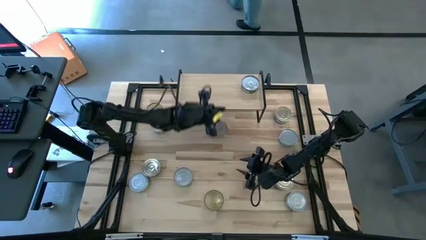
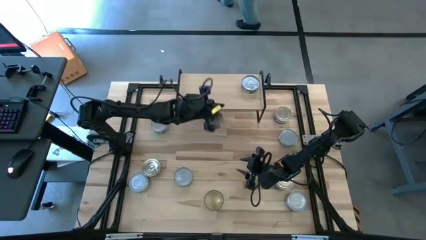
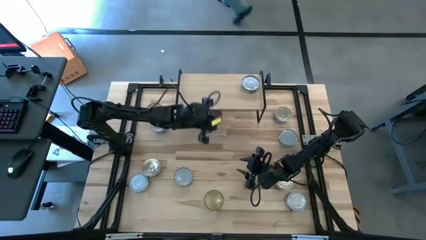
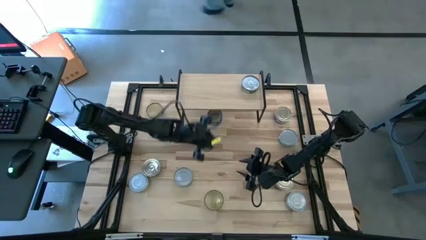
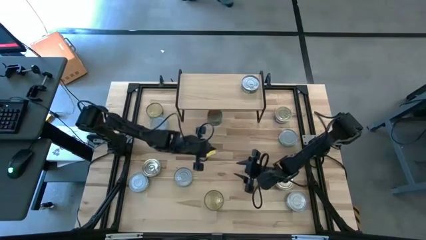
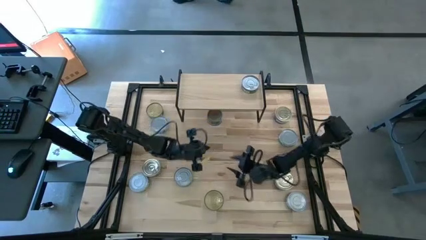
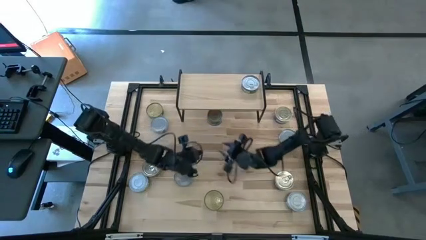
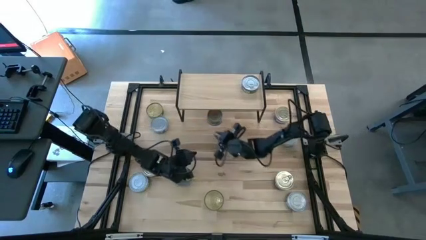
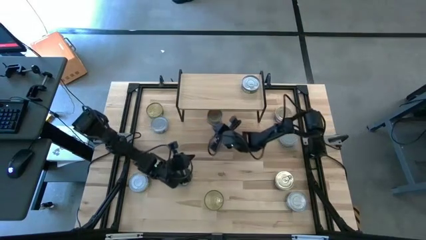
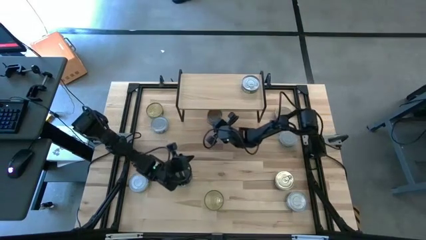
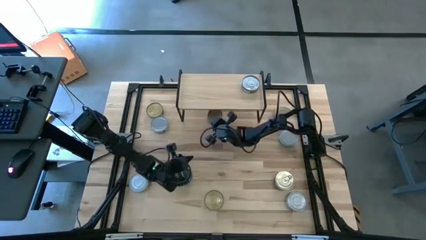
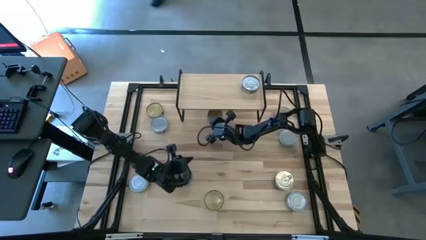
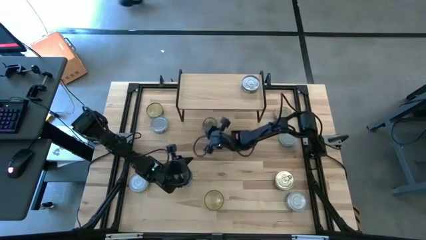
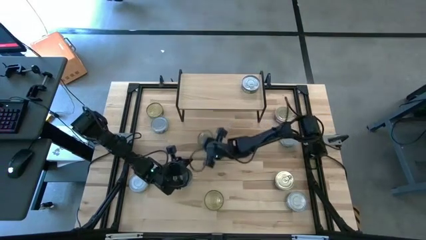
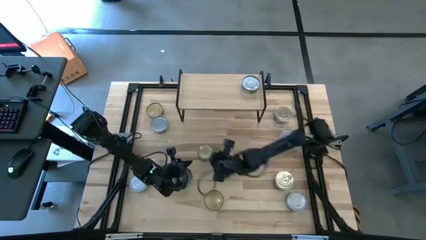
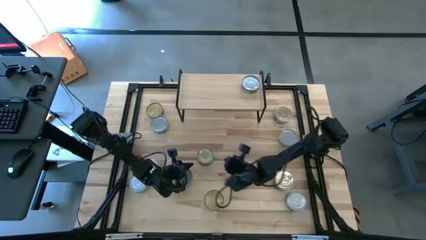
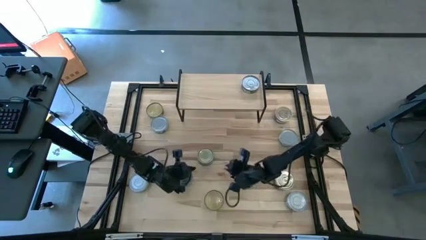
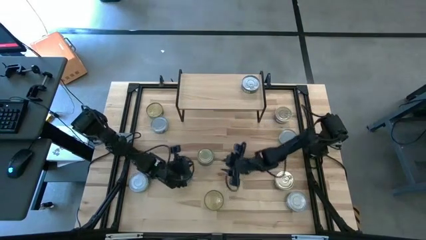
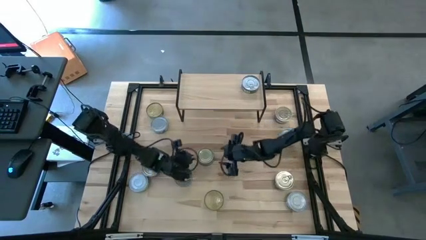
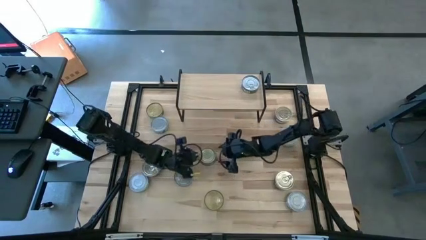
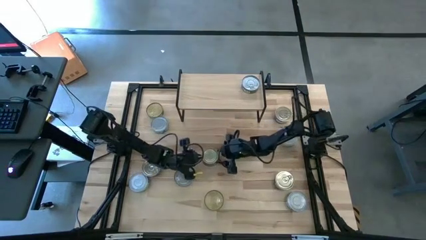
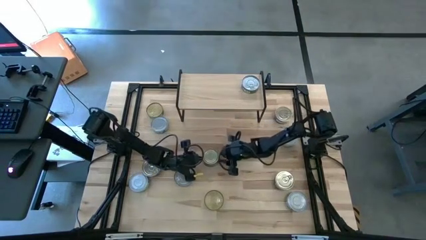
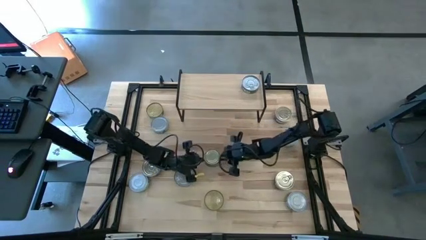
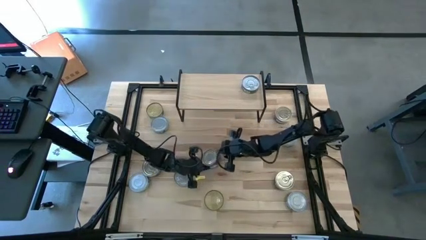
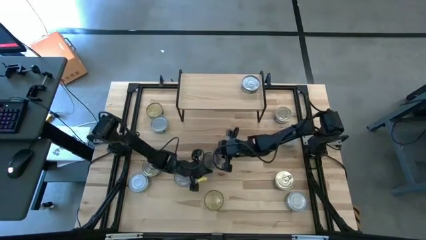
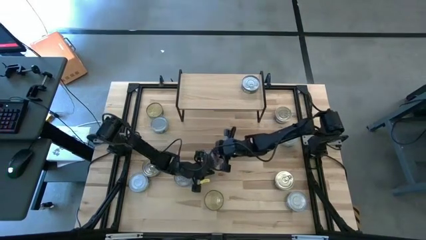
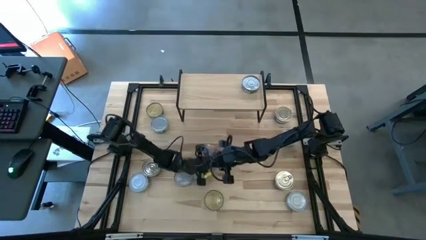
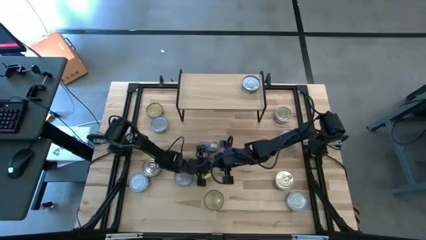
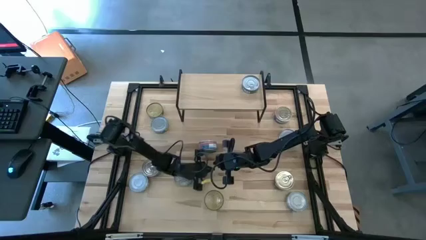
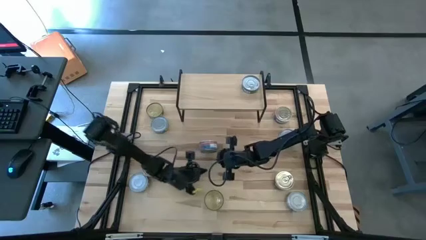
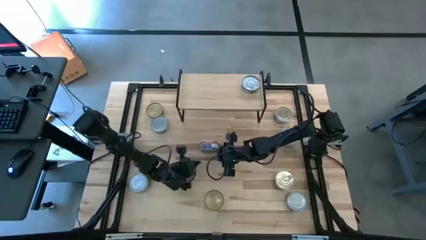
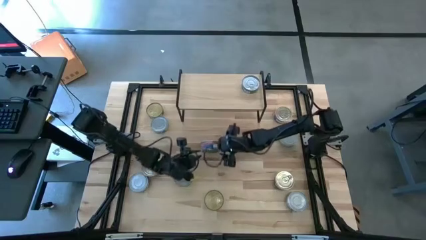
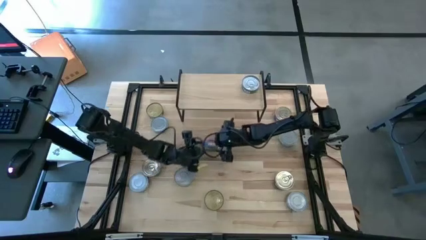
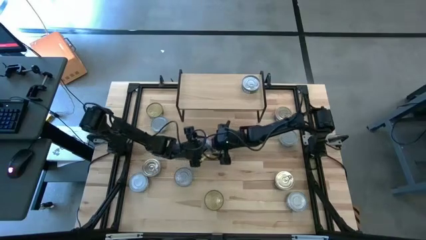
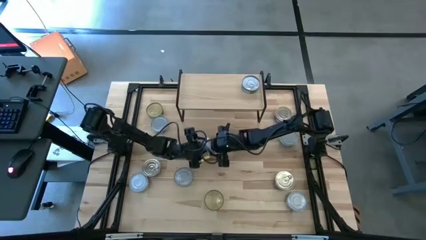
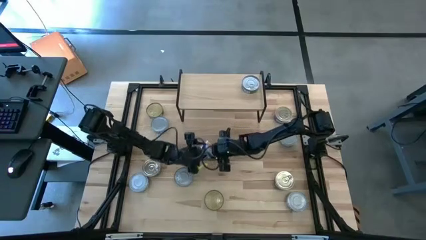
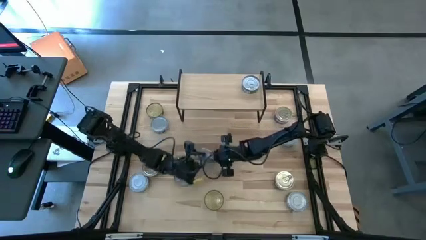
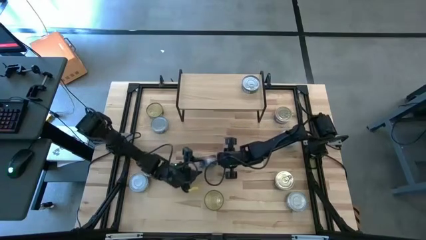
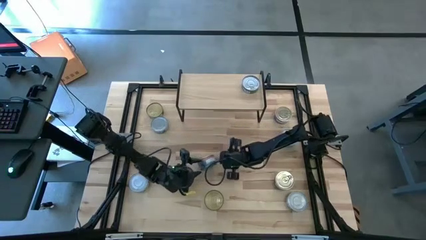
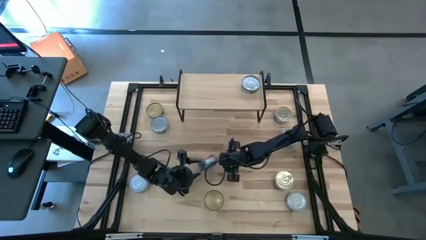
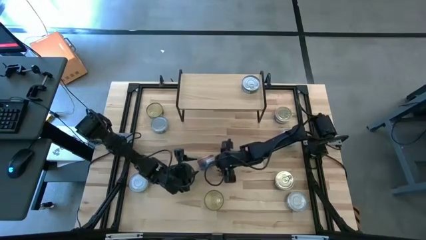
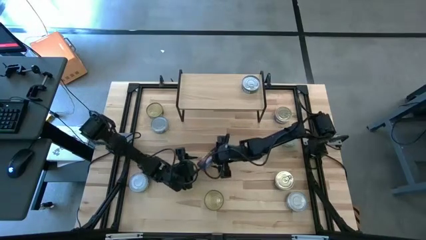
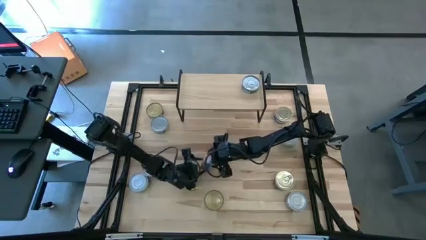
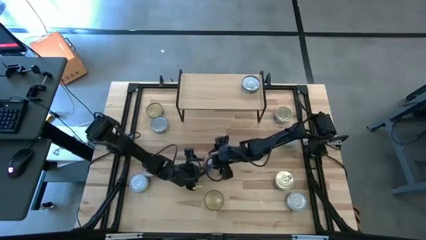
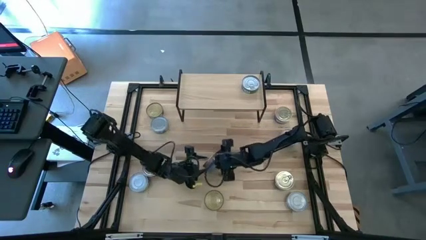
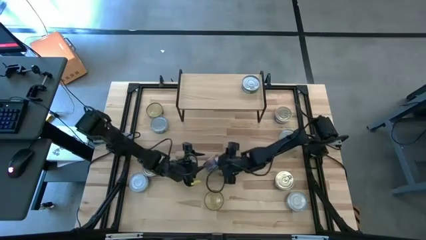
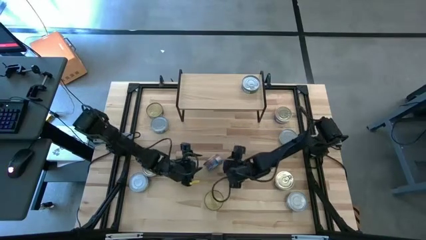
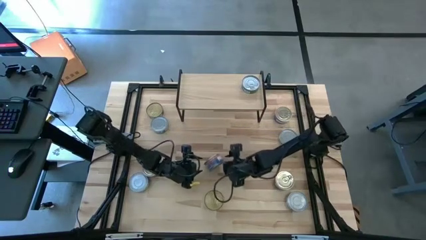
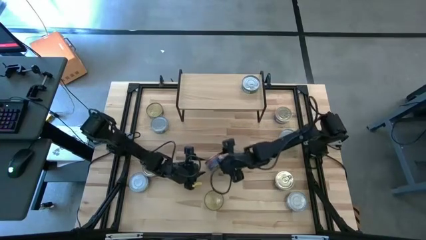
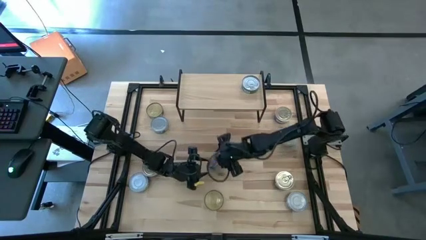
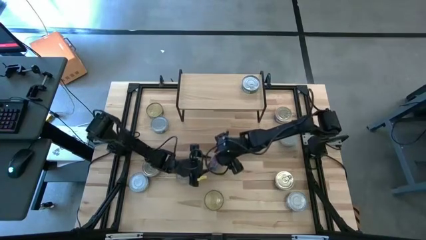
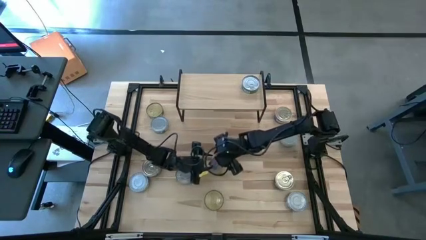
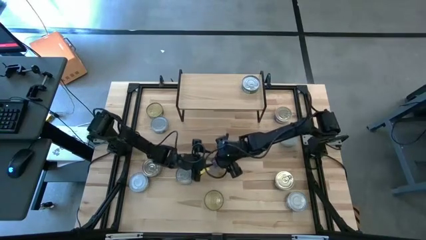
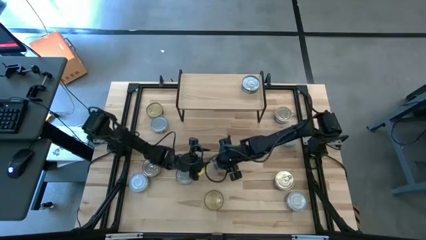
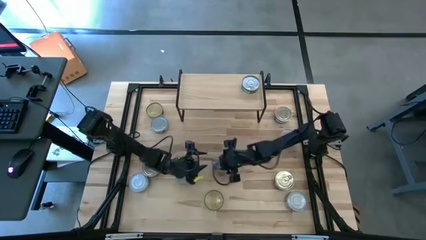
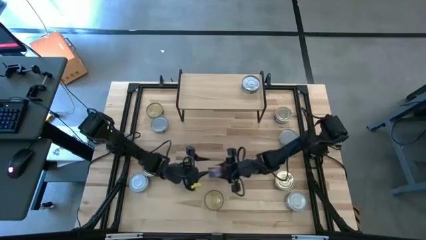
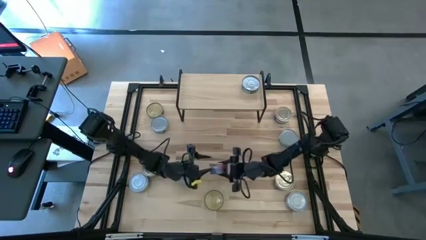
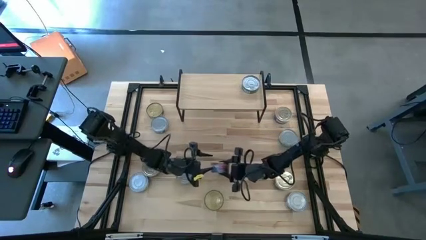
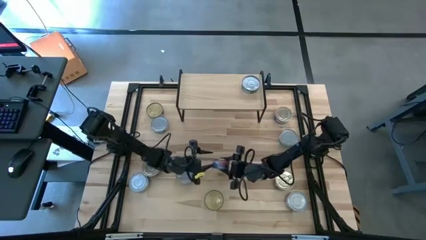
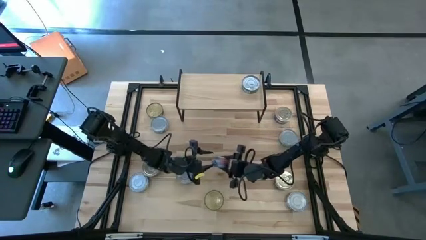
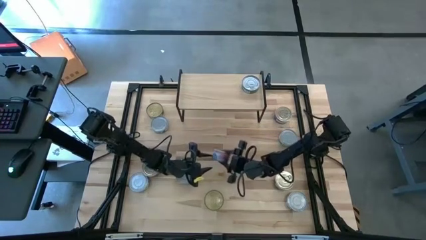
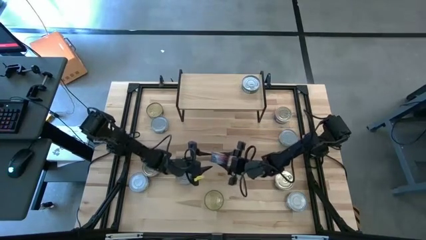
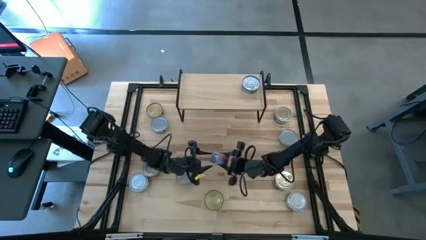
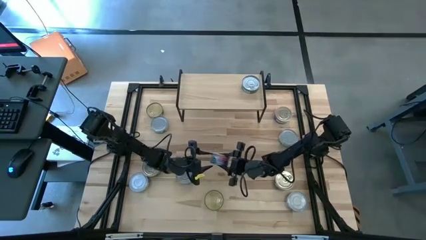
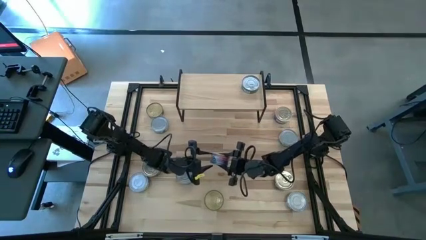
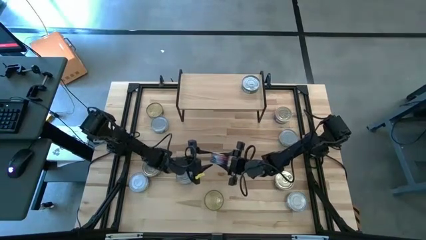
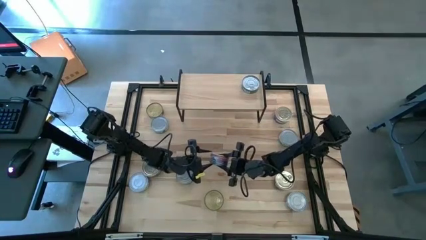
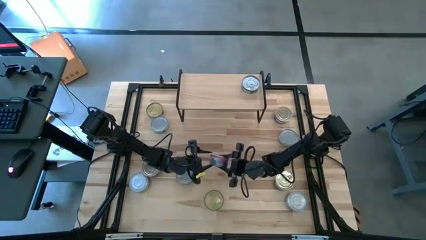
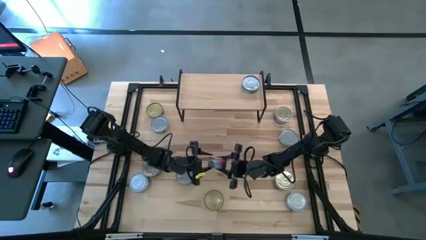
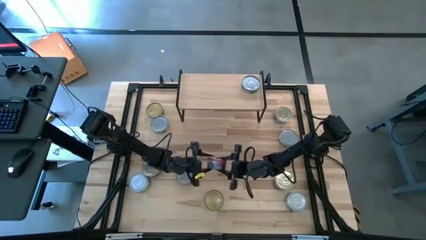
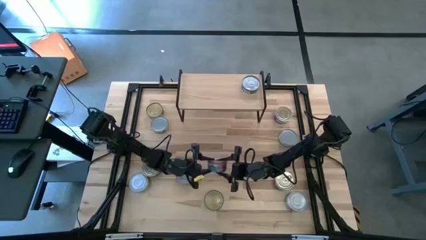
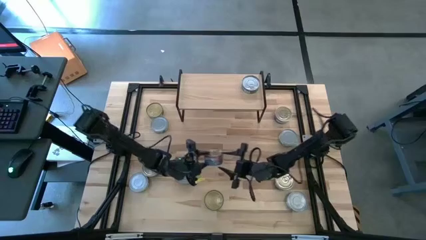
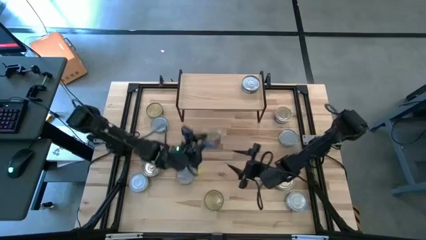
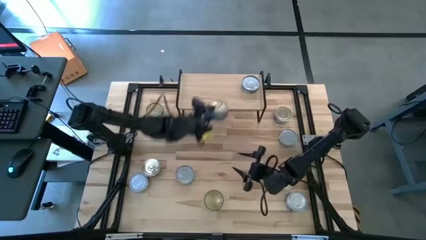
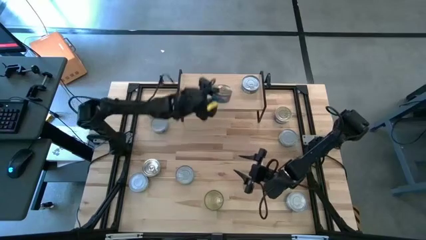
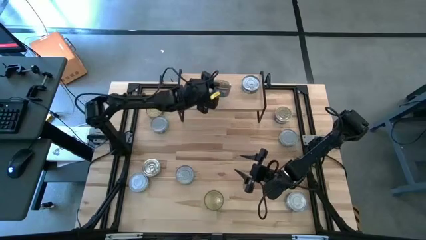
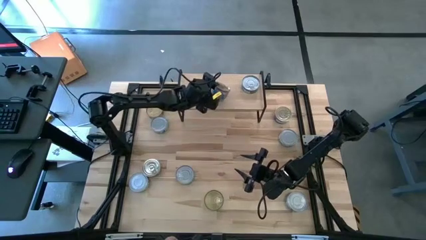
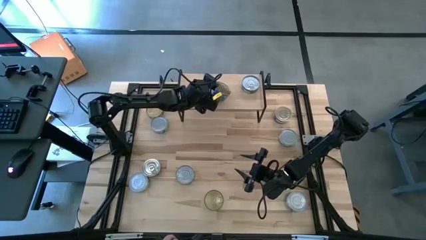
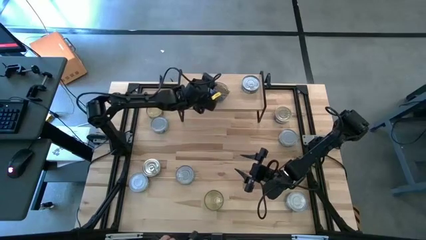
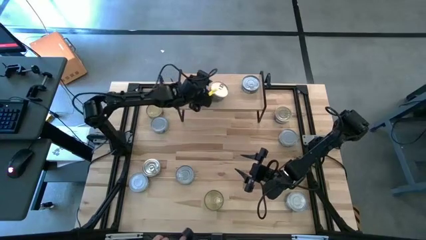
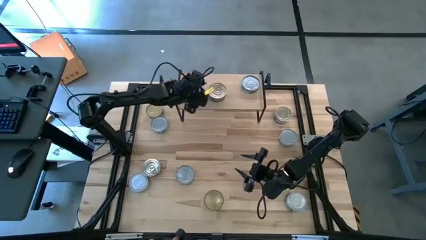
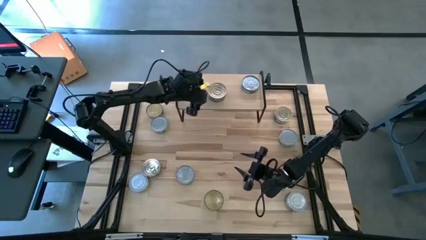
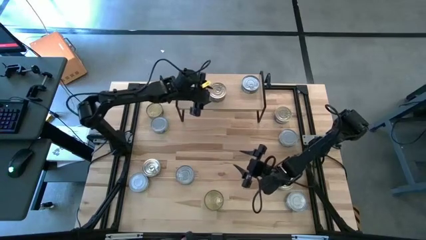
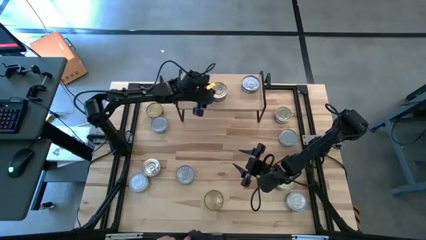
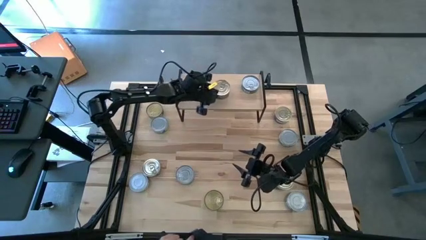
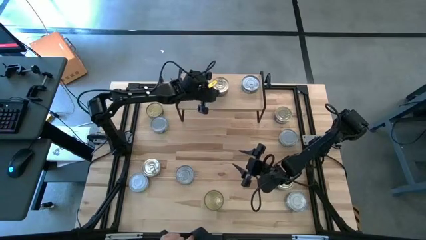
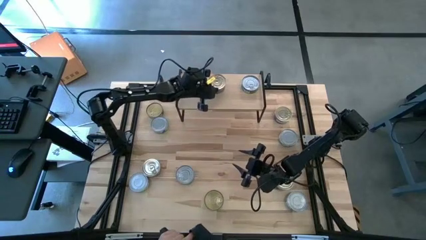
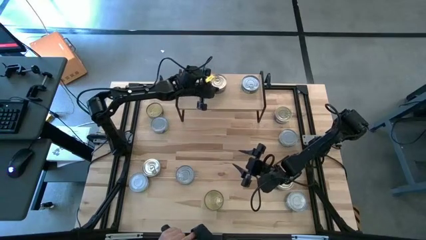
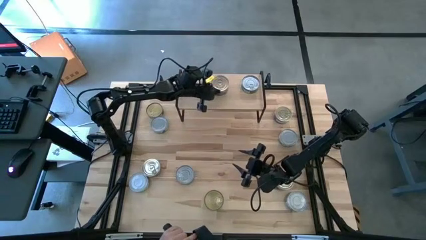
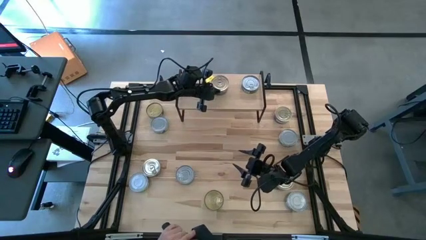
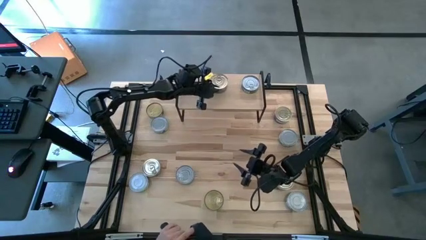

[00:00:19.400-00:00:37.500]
Task: Stack canned seafood by type on shelf
Put the blue tuna can on the shelf
